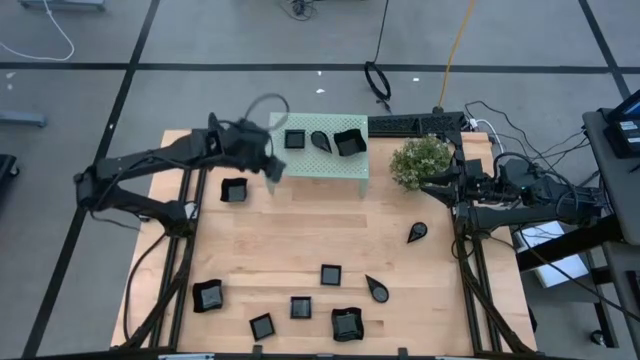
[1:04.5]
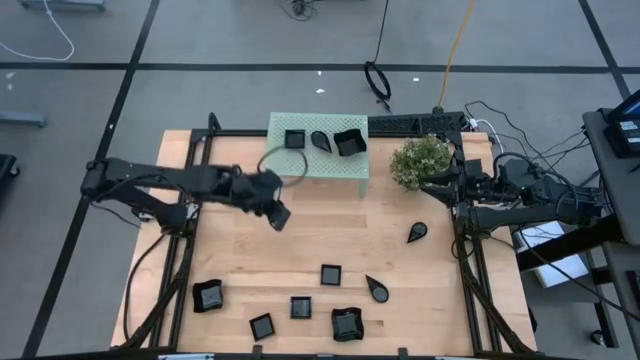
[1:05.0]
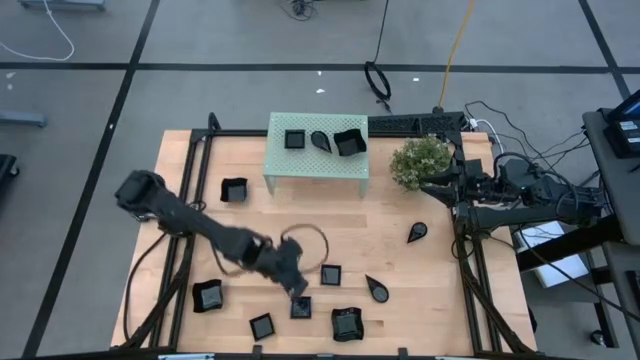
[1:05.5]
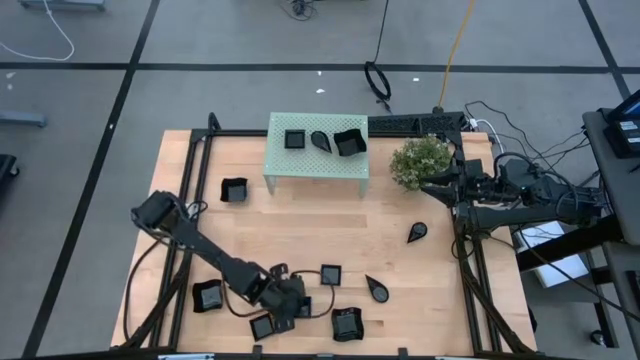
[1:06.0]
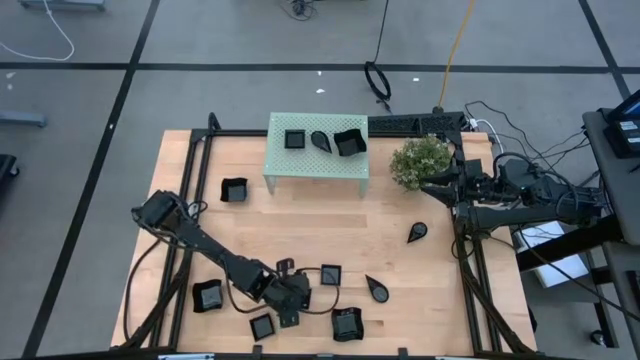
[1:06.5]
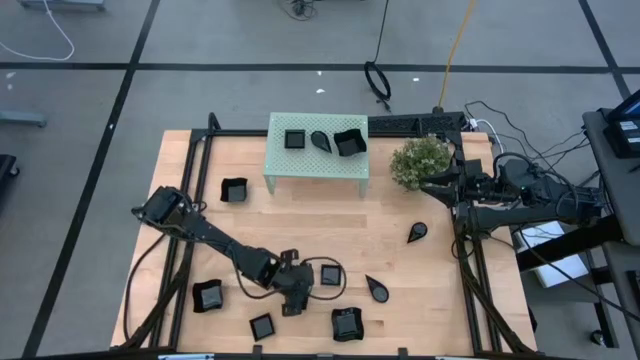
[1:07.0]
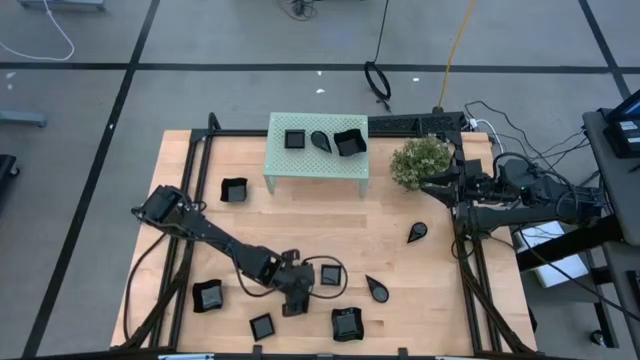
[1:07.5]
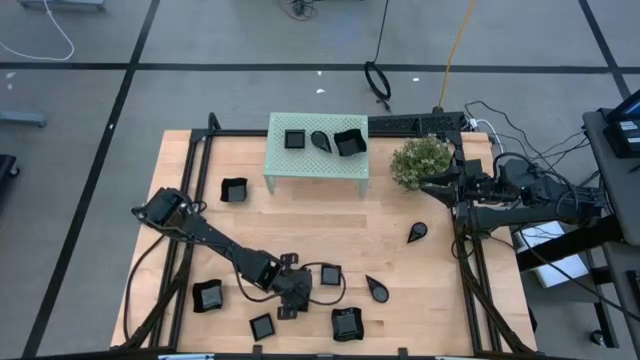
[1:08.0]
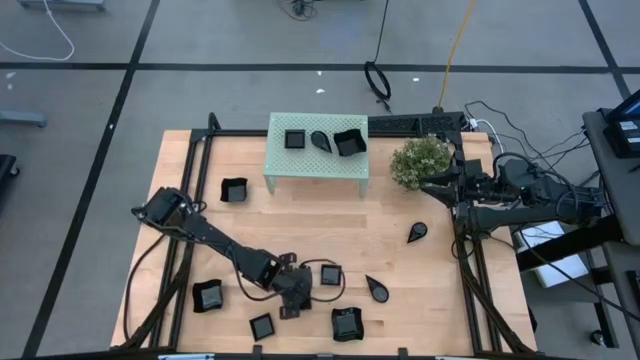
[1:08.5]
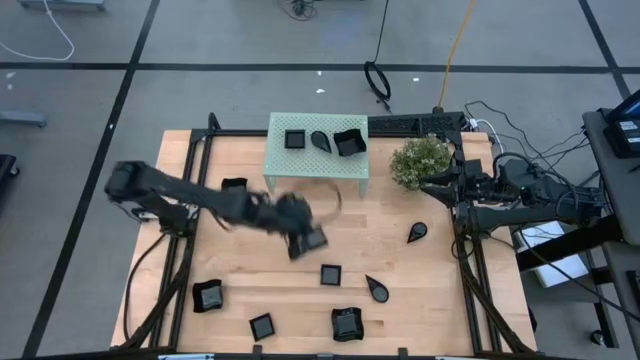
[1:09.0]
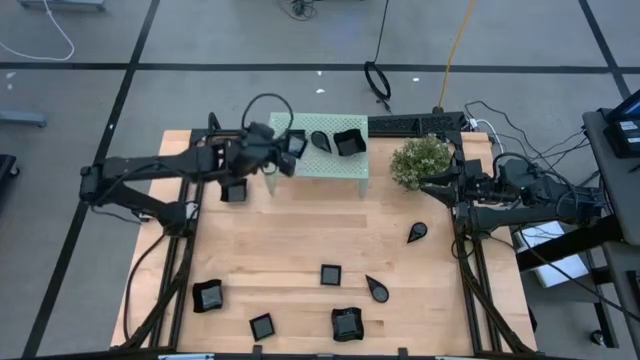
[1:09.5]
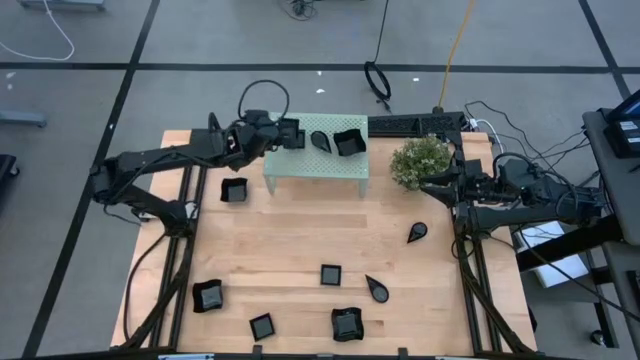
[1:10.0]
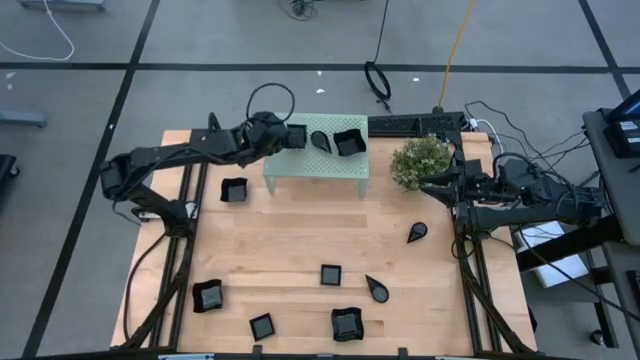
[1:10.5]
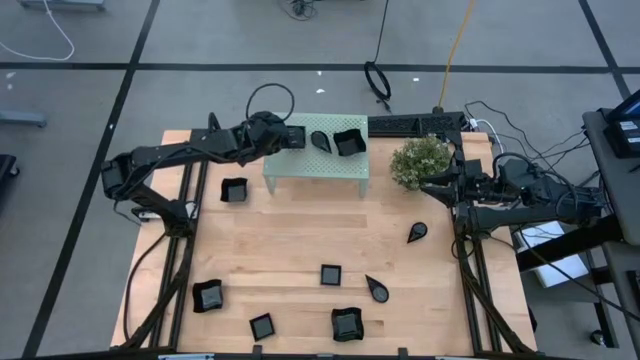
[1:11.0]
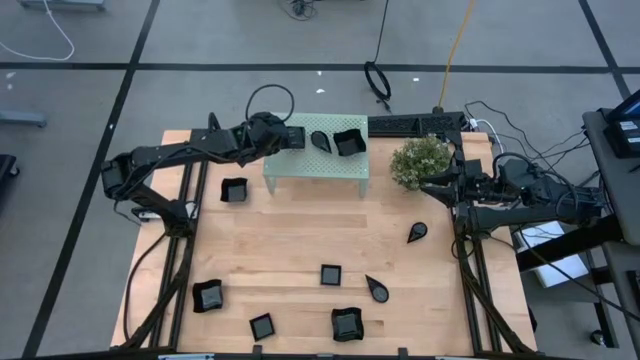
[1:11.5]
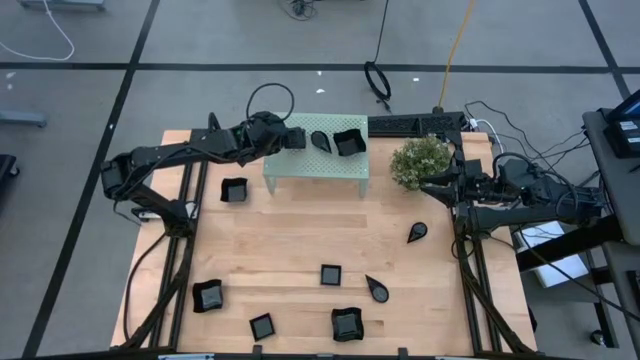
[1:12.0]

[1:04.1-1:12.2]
Task: Pick & Place Mini shaped plates
Stack the black square plate on top of the other black square plate on the shelf

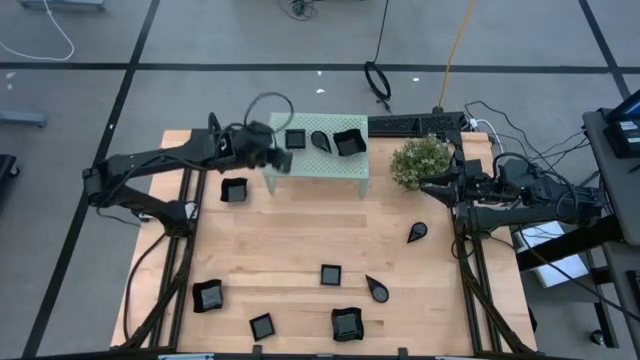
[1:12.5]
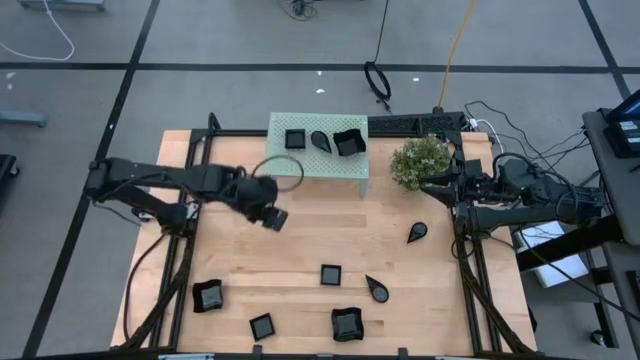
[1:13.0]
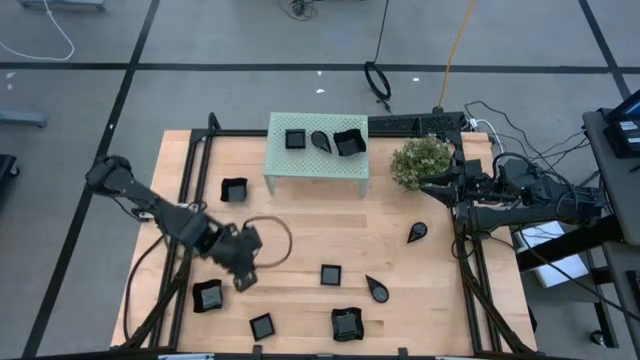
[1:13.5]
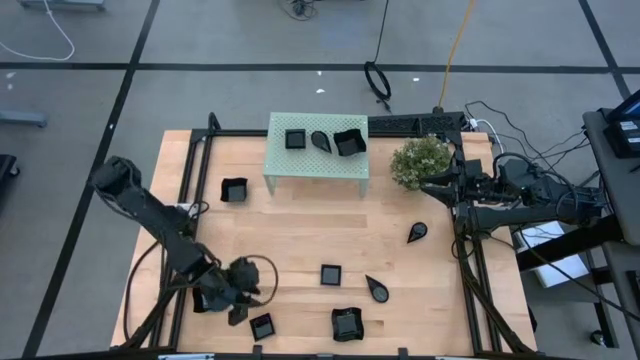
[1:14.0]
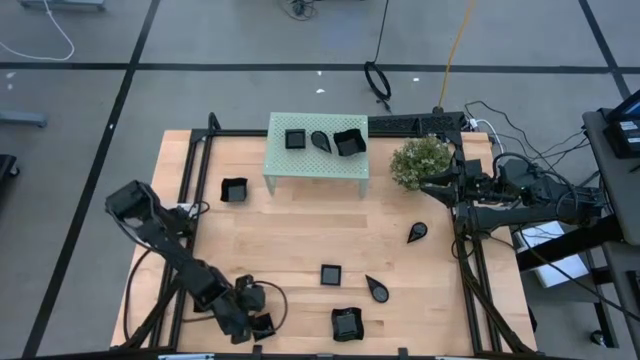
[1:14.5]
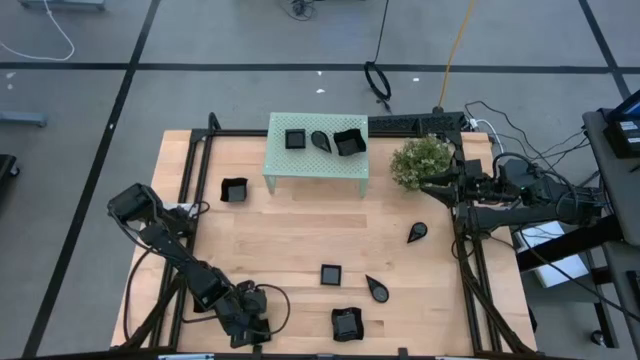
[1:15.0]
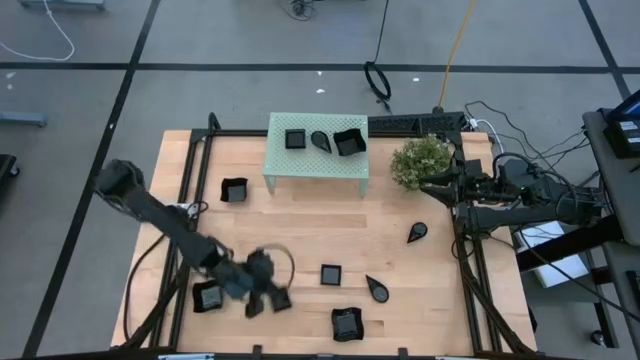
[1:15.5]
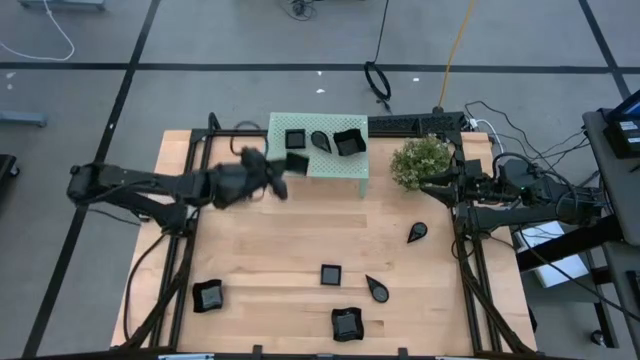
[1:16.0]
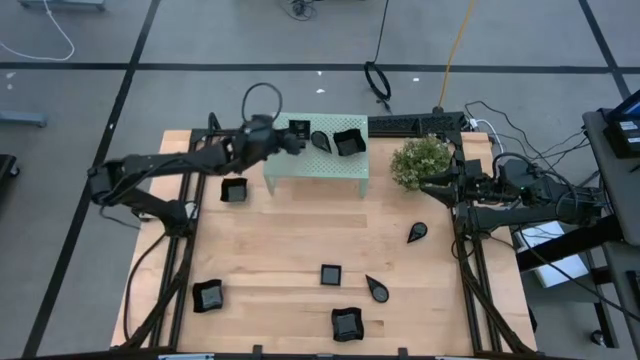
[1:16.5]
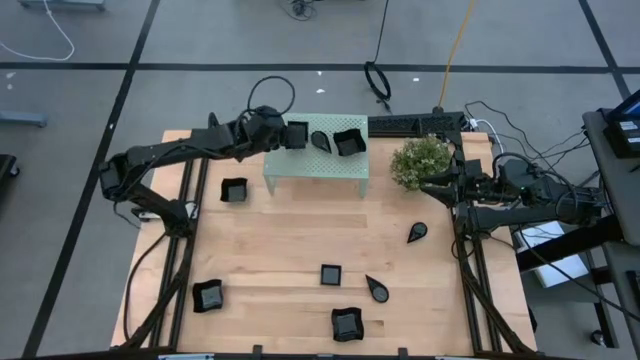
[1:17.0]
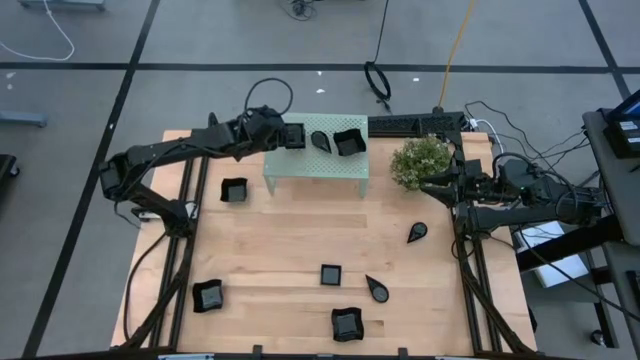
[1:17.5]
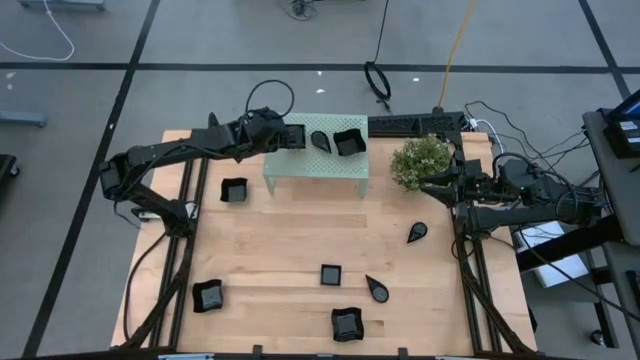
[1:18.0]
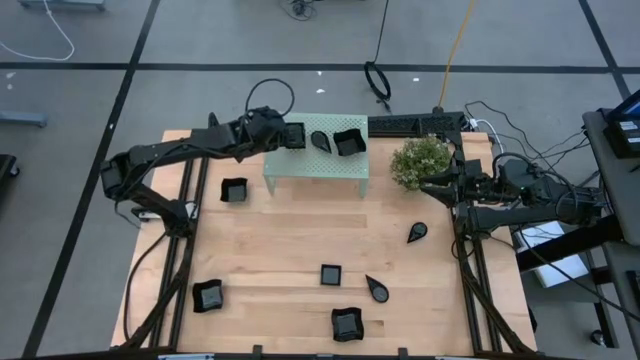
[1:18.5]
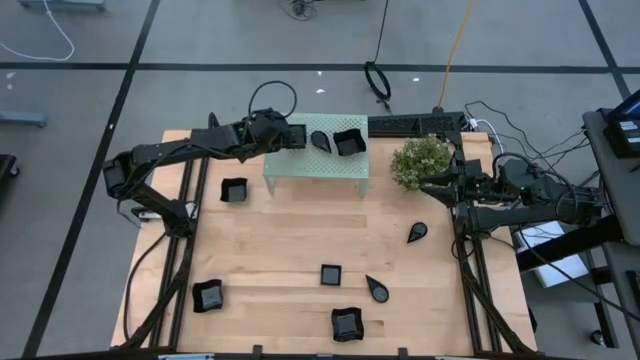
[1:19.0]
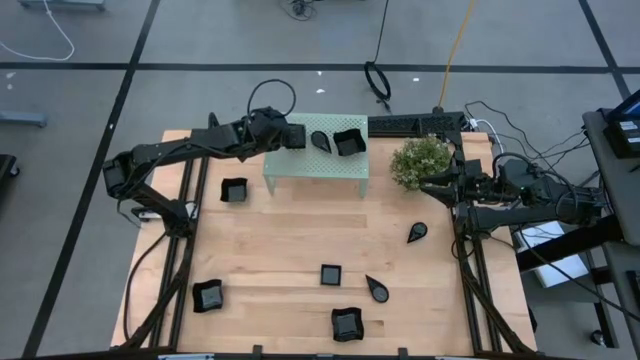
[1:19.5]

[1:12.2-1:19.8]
Stack the black square plate on top of the other black square plate on the shelf

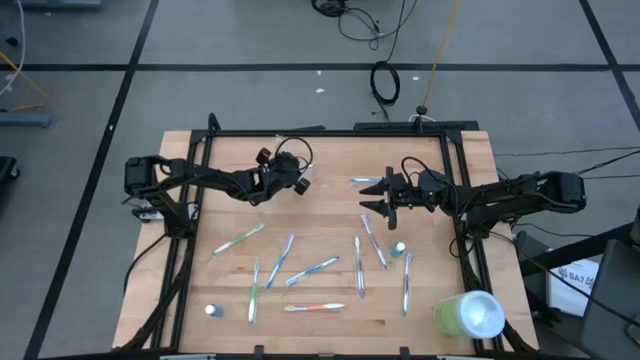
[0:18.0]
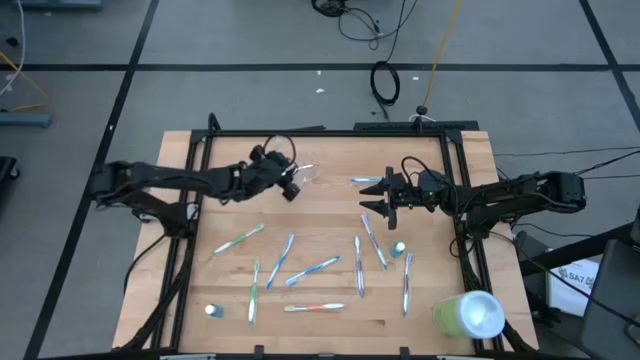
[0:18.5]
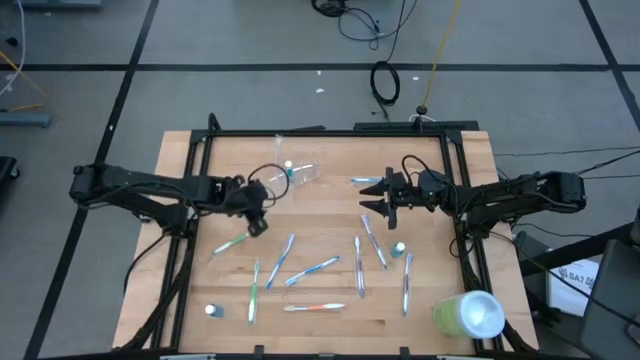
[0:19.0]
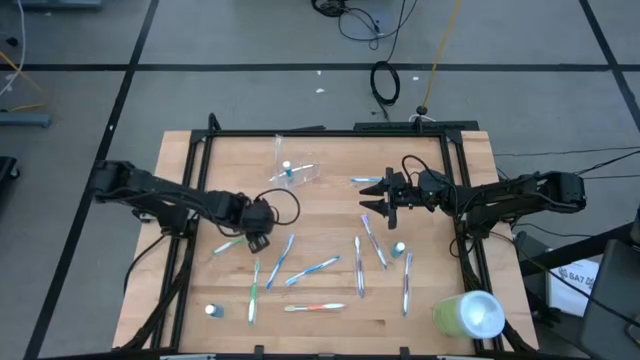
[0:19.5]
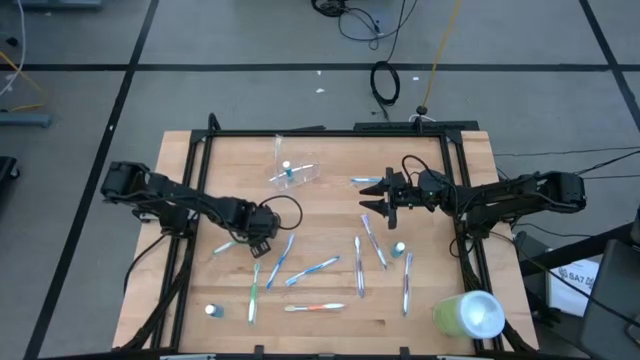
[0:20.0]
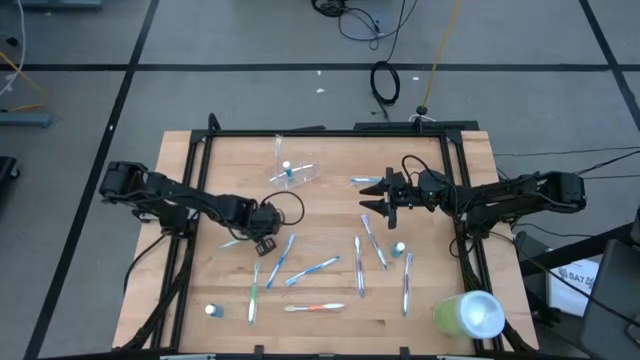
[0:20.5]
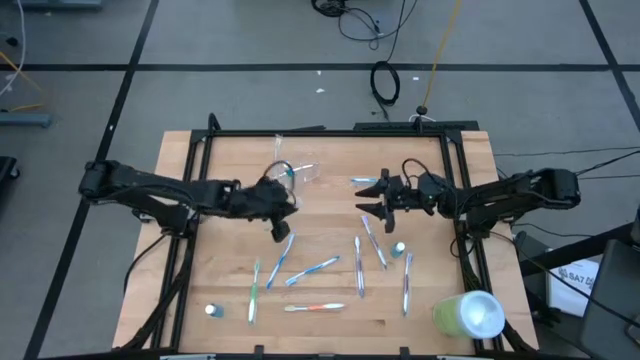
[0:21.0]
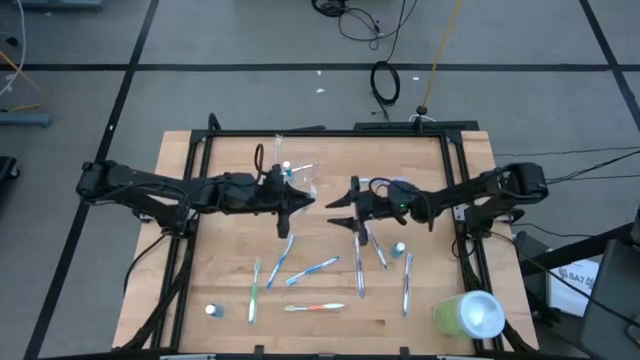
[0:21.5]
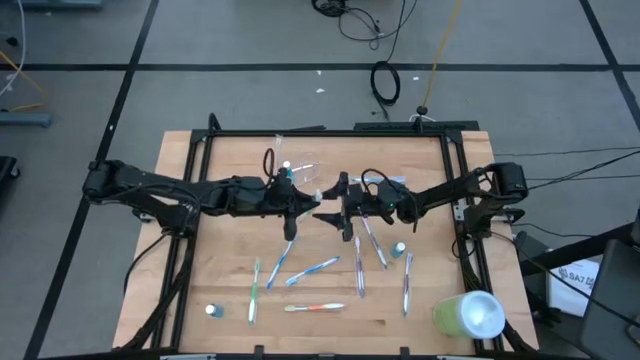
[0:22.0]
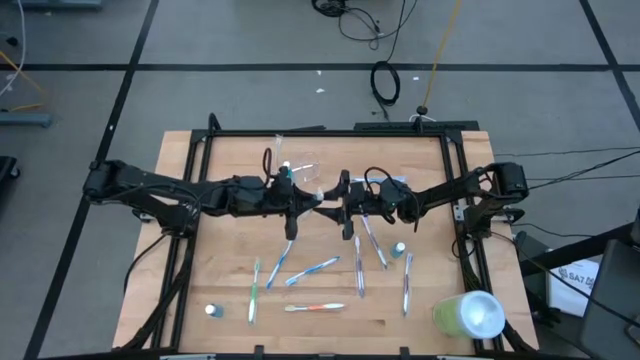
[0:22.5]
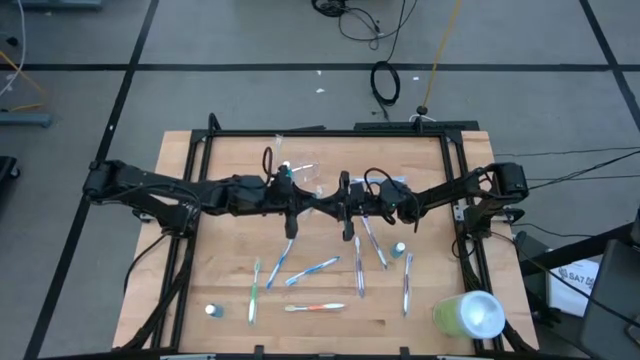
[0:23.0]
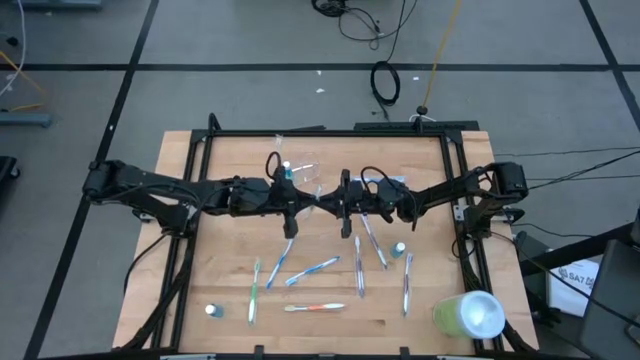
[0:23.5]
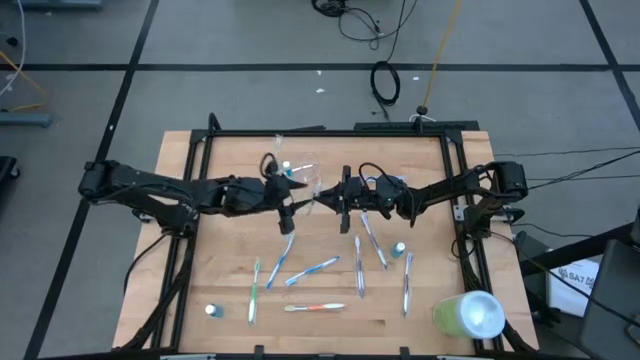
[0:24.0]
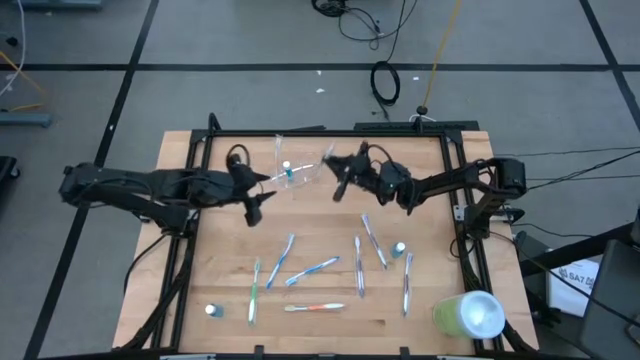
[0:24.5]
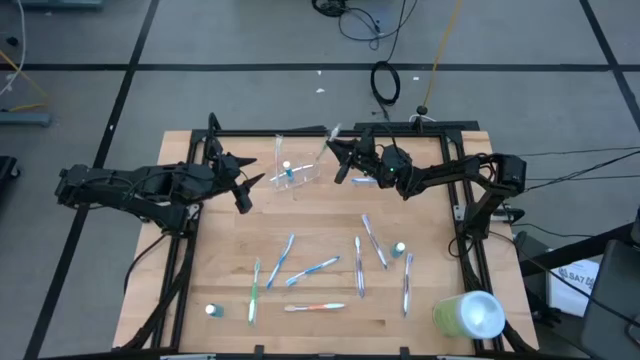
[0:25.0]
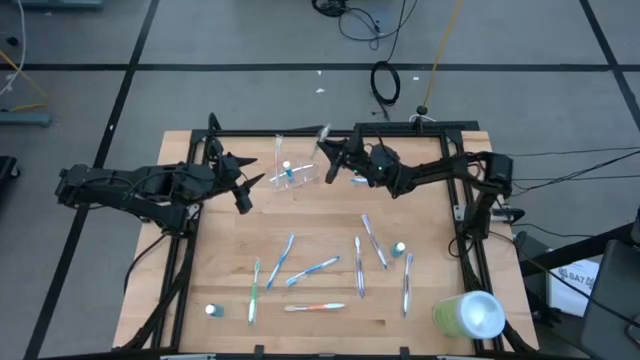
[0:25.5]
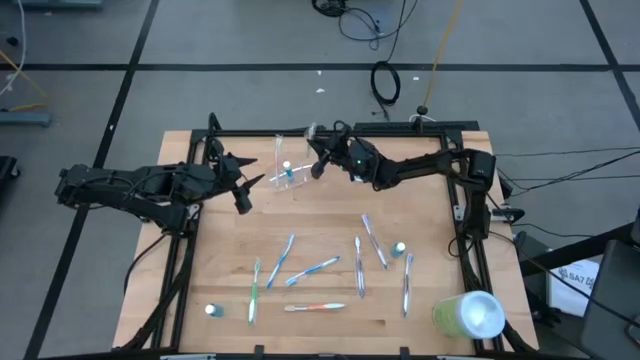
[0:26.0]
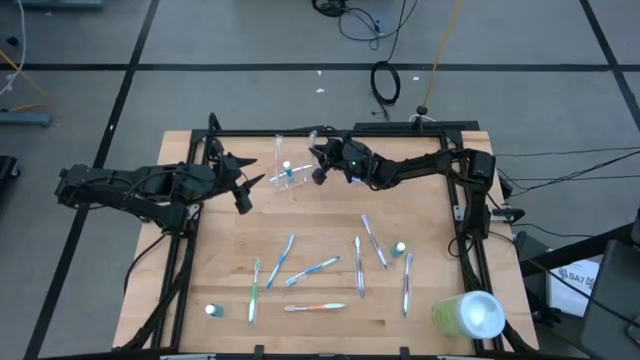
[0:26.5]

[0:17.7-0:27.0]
Task: Pick & Place toothbrushing station
Put the top green toothbrush into the transparent organizer
